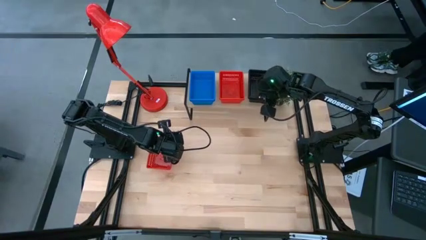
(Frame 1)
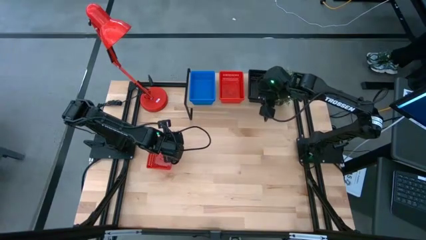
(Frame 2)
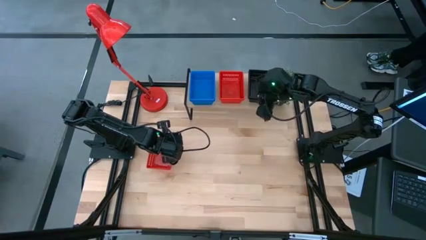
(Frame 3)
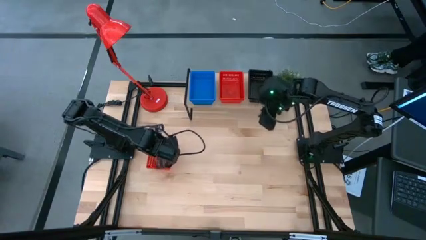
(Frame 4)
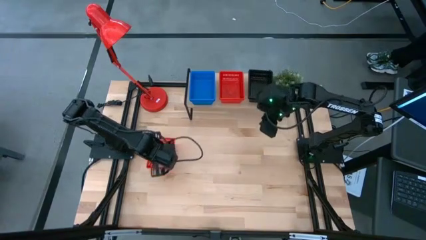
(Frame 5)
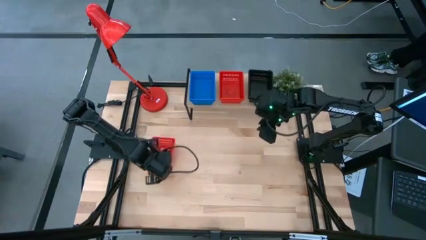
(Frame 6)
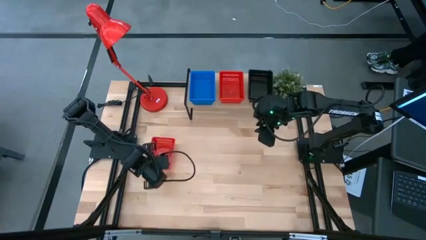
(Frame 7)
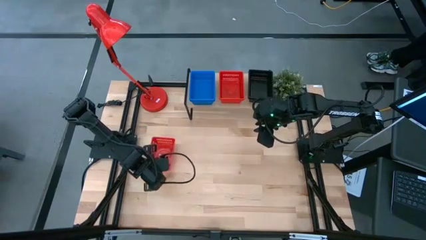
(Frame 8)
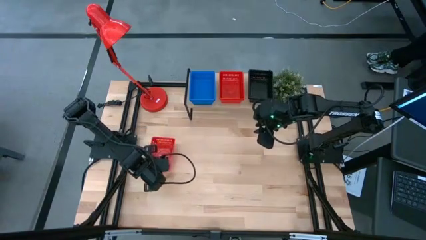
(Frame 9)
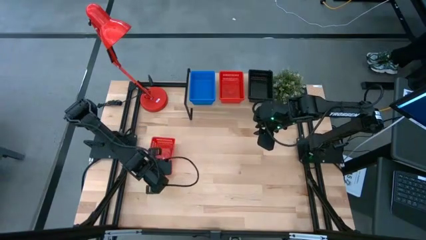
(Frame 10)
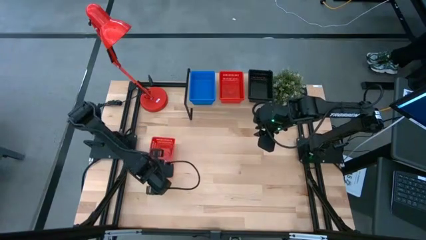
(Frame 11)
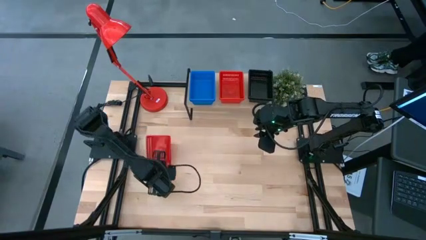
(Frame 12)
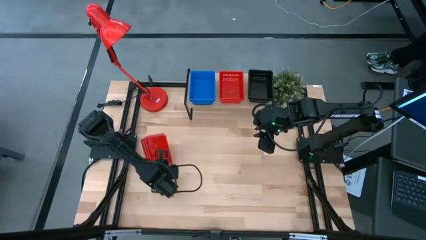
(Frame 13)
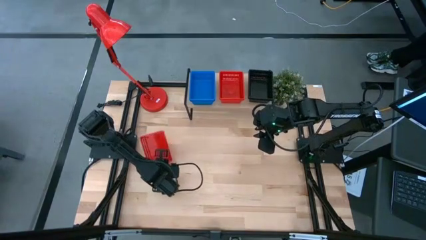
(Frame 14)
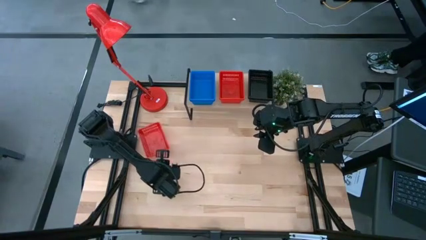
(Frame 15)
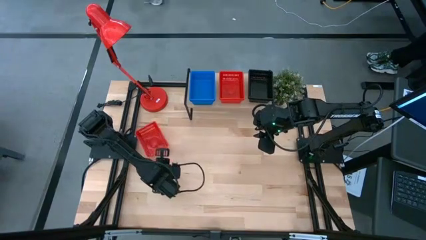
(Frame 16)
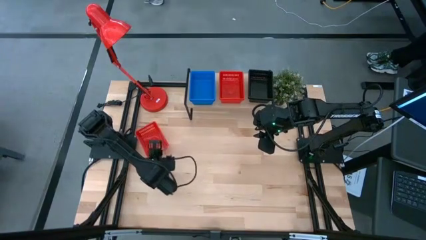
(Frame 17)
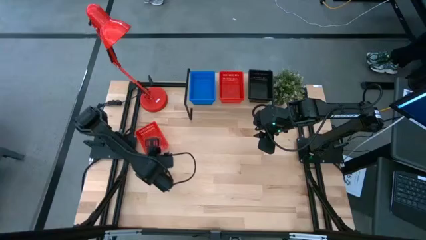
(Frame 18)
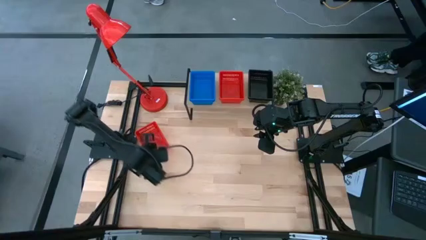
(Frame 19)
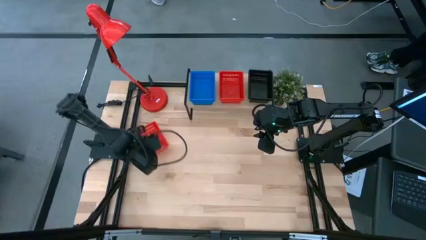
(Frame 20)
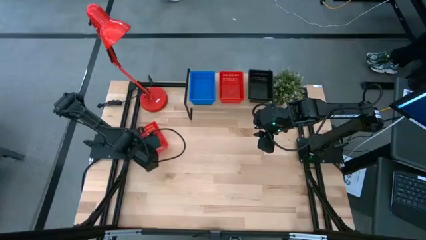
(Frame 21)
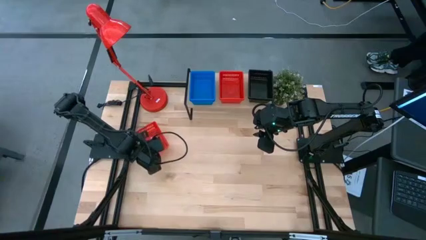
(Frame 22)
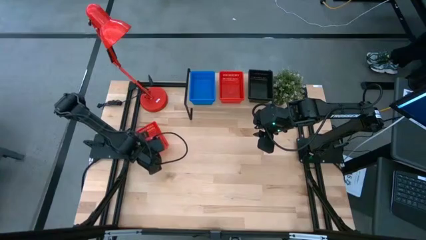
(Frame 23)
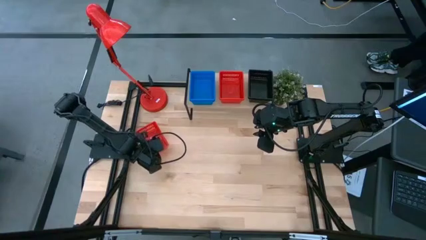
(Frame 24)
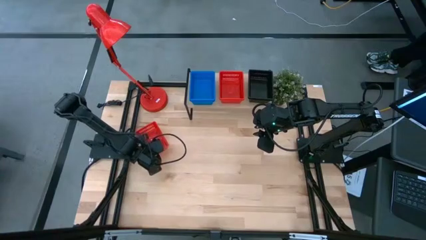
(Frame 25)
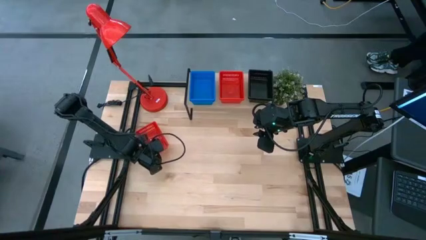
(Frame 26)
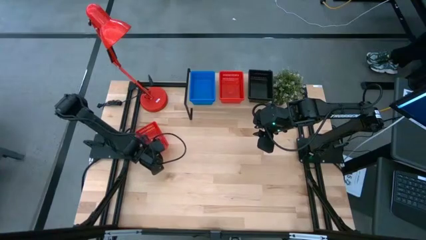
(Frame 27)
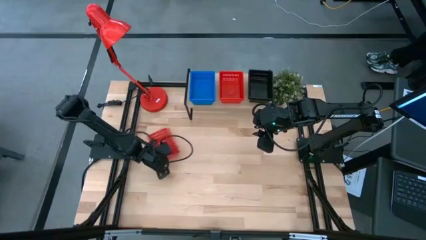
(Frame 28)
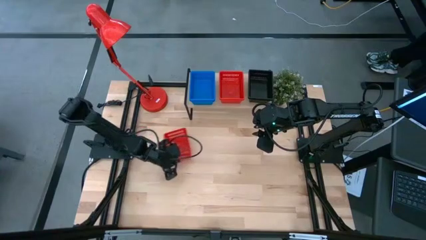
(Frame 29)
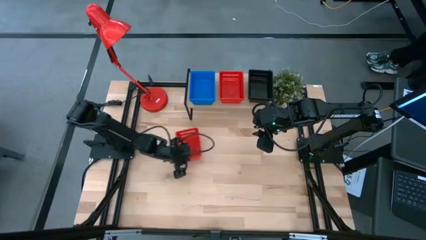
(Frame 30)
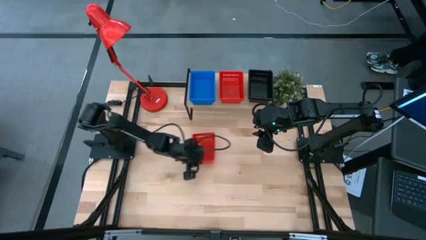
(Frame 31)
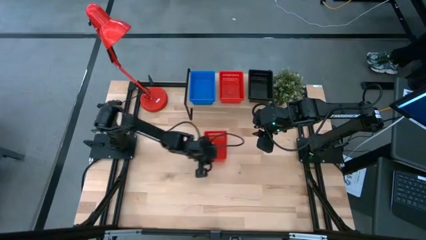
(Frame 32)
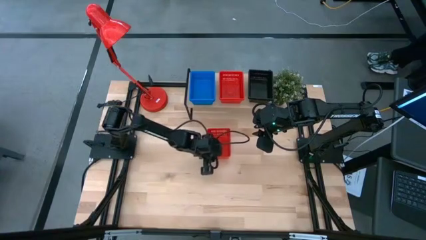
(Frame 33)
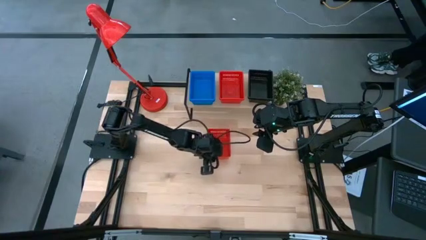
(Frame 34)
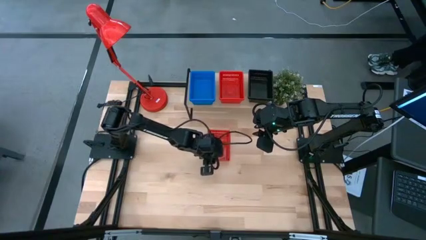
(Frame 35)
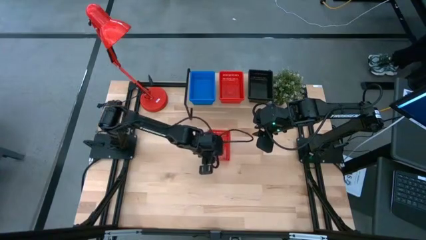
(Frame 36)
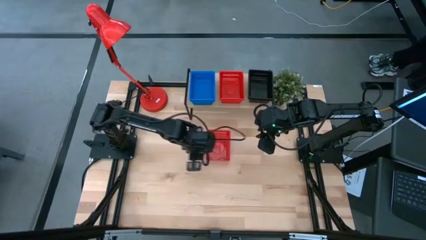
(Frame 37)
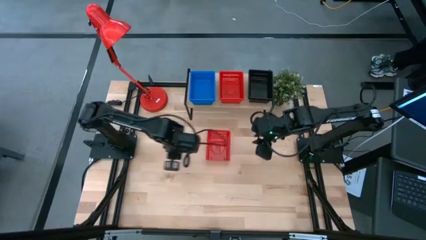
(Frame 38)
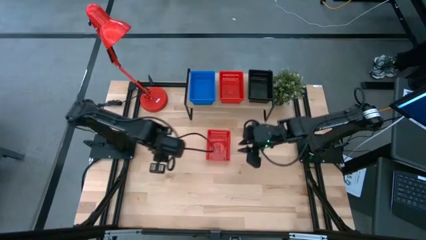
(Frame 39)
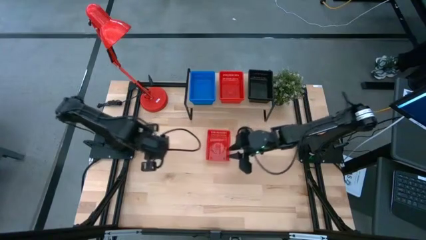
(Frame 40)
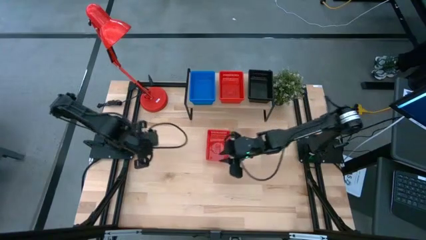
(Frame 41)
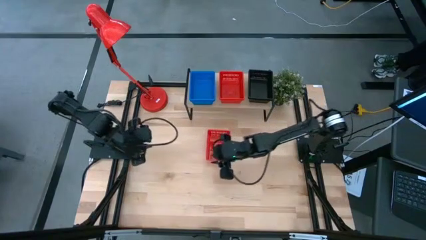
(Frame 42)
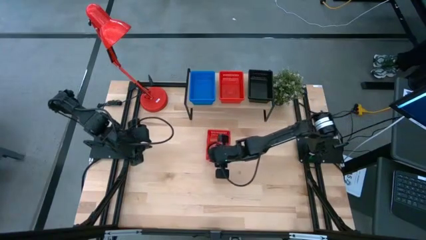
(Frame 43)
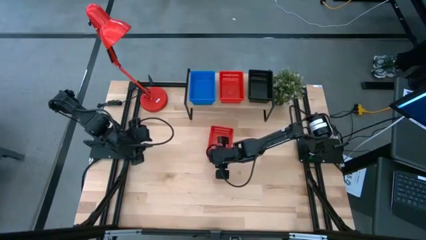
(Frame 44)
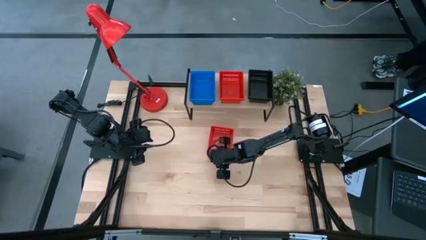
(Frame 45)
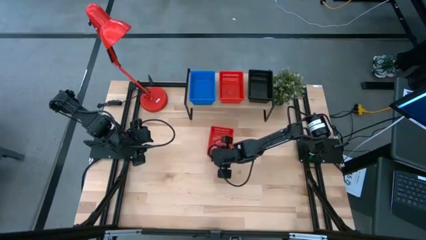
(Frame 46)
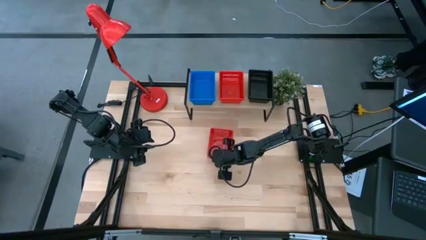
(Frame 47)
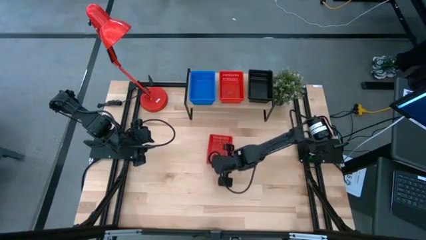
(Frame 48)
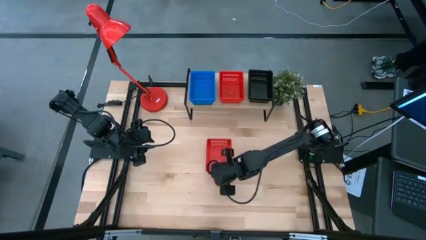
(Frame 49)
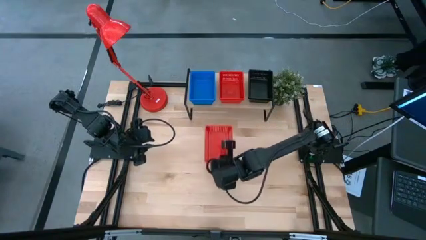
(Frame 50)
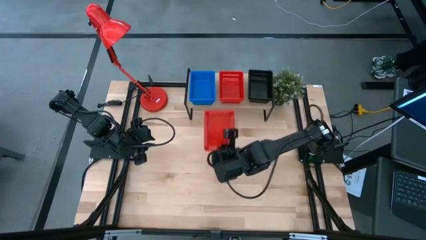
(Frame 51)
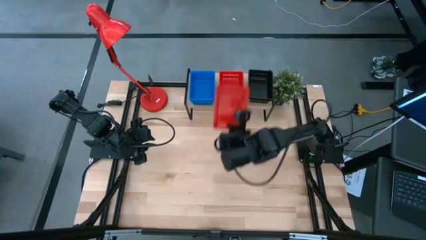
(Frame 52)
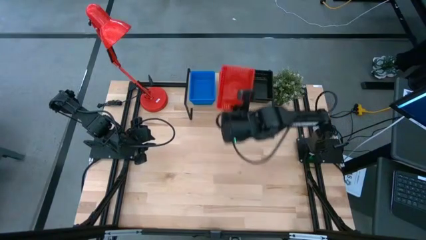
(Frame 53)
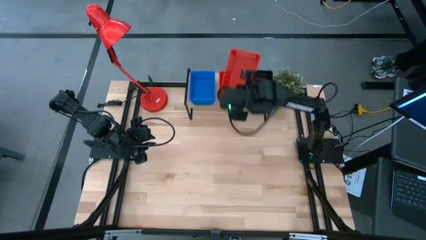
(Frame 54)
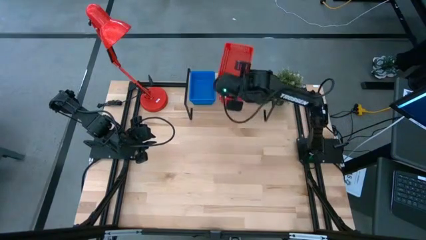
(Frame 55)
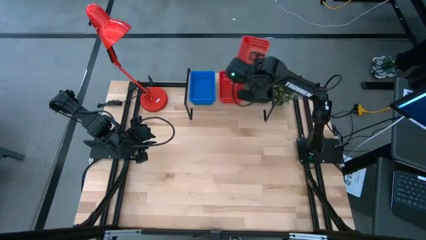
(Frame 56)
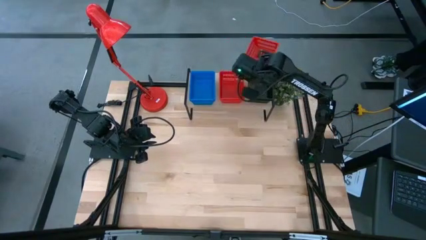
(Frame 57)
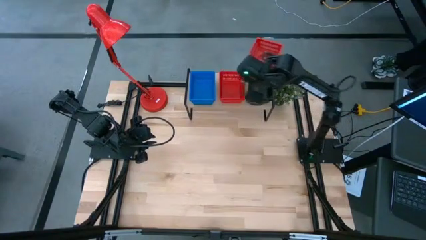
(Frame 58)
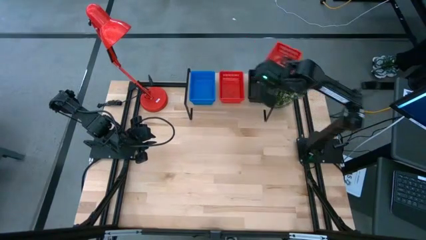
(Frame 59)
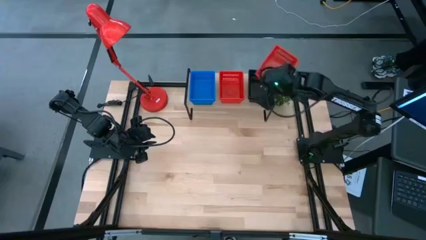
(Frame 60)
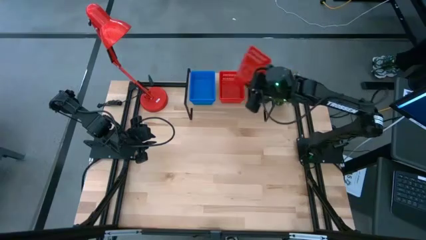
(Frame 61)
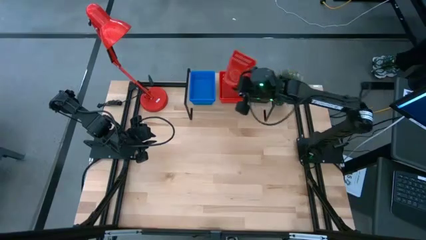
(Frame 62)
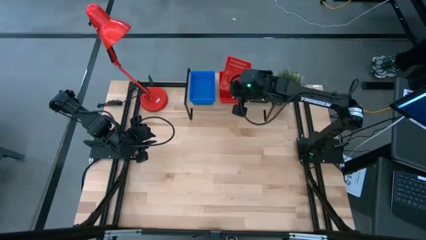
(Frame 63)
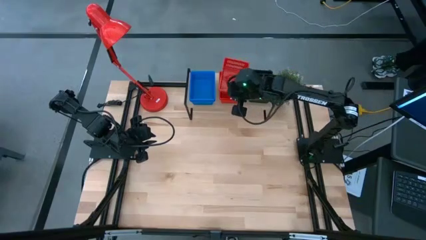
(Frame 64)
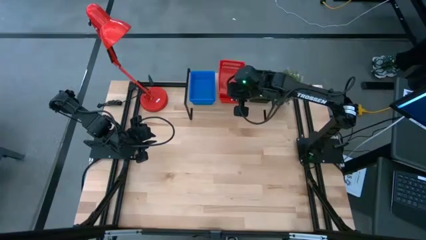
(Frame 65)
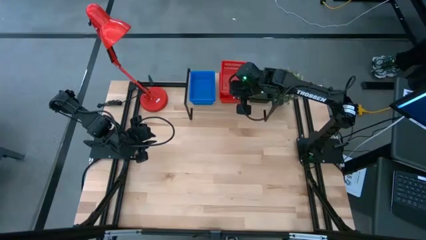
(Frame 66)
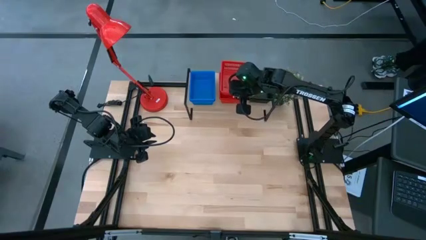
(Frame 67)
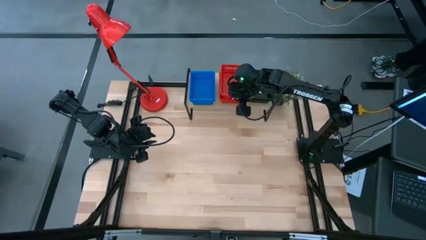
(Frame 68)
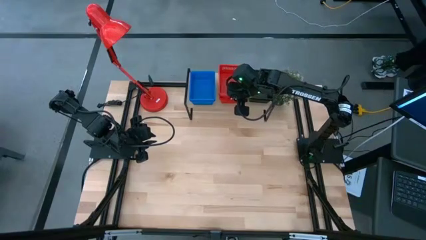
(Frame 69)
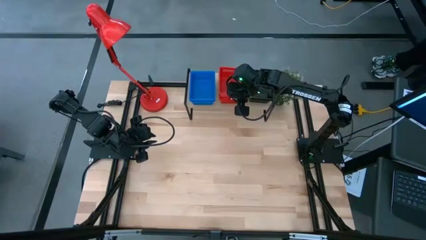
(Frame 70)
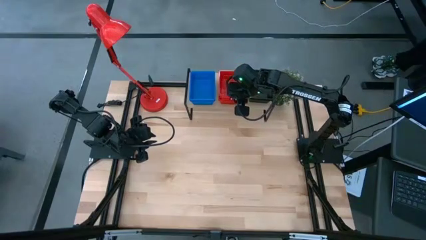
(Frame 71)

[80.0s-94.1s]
Task: Stack baskets on shelf by color
Stack the red bin on top of the red bin on the shelf
